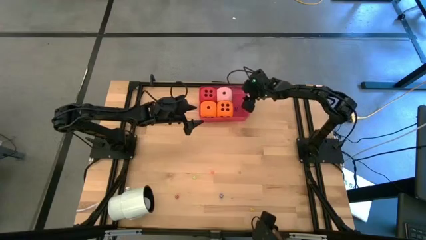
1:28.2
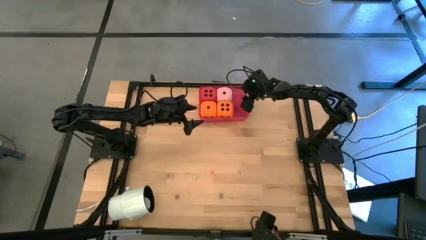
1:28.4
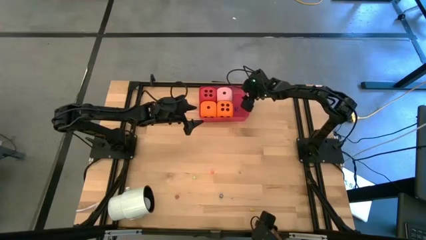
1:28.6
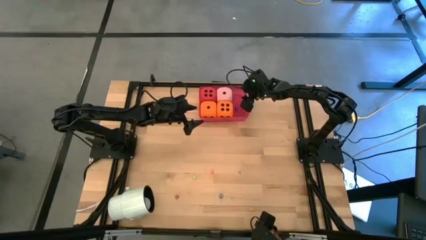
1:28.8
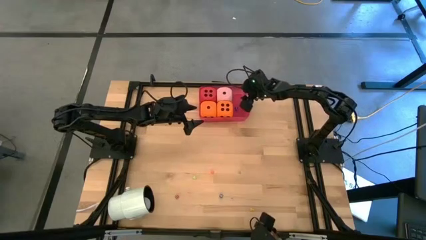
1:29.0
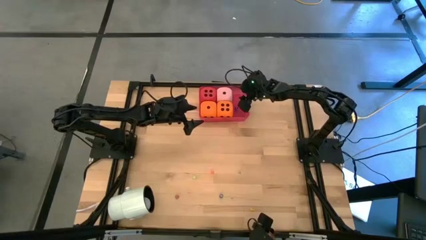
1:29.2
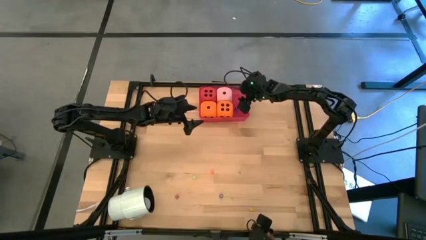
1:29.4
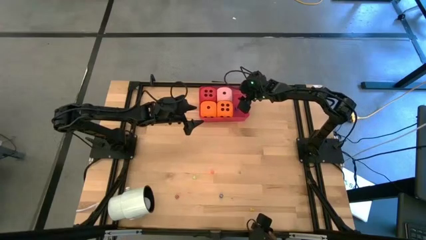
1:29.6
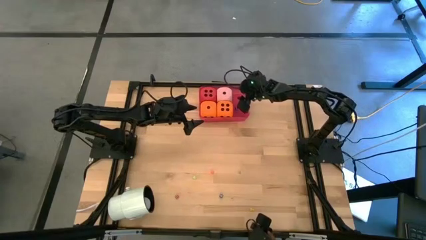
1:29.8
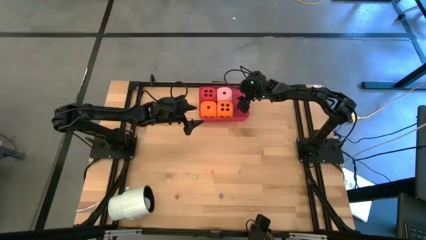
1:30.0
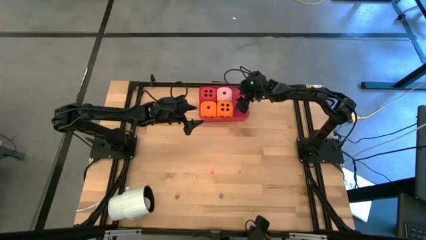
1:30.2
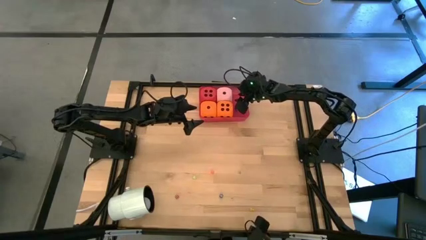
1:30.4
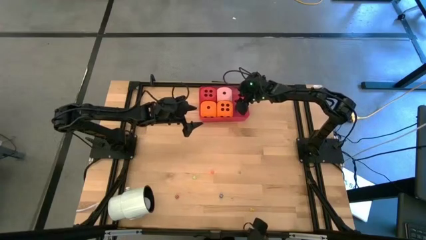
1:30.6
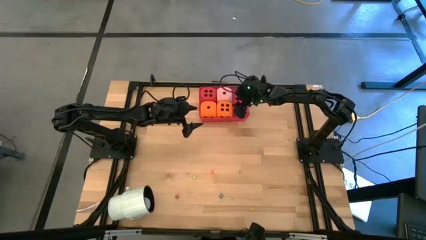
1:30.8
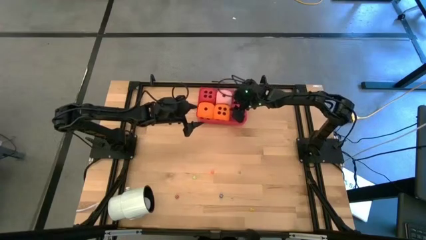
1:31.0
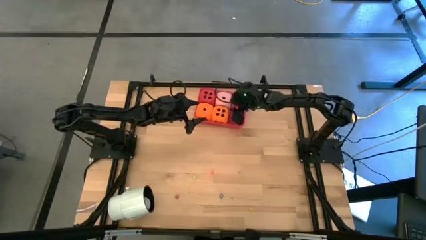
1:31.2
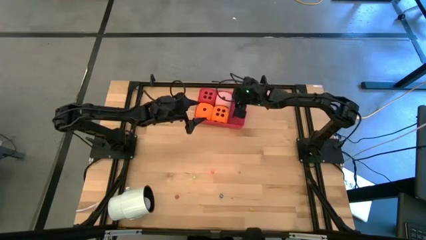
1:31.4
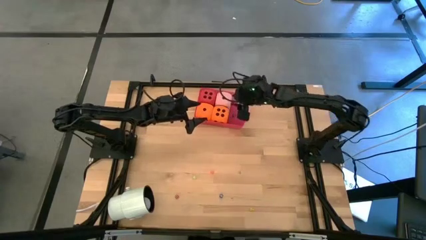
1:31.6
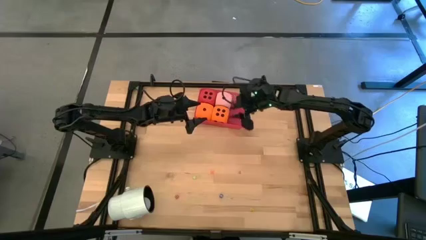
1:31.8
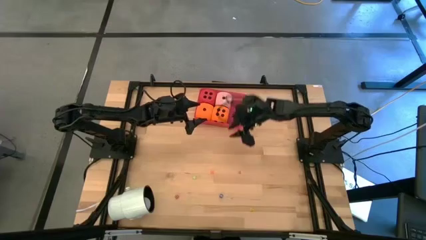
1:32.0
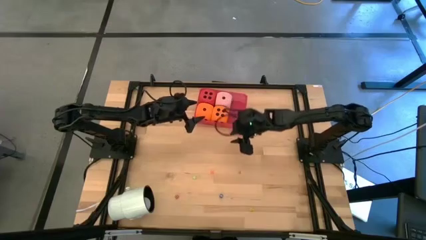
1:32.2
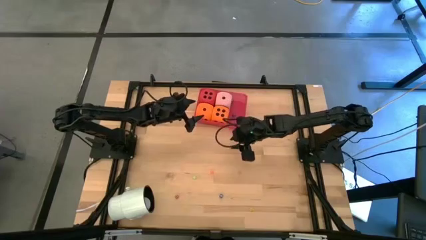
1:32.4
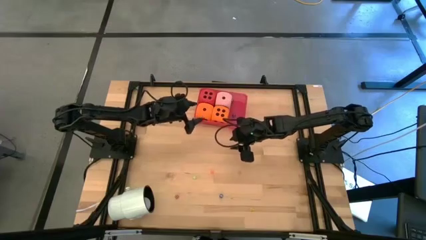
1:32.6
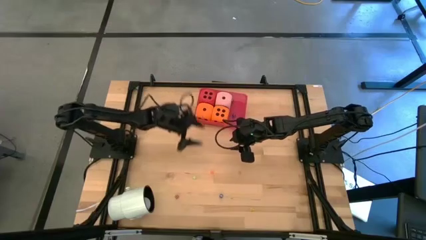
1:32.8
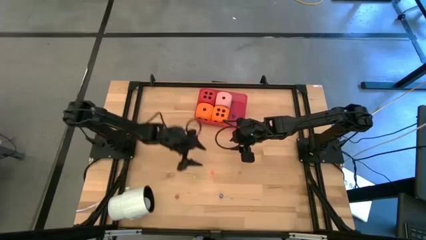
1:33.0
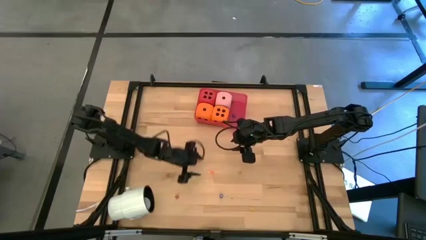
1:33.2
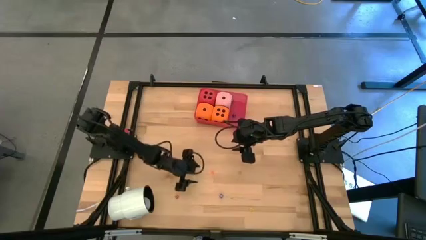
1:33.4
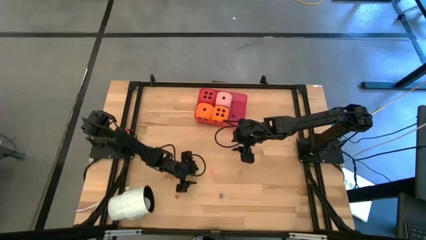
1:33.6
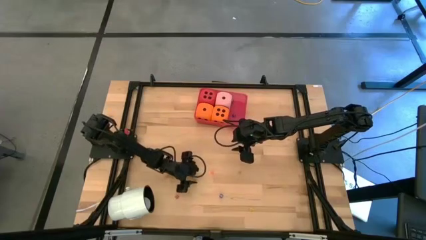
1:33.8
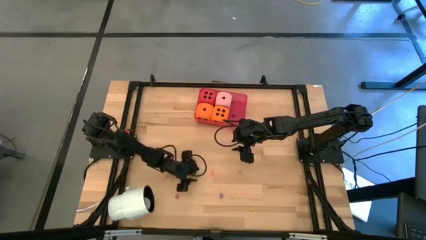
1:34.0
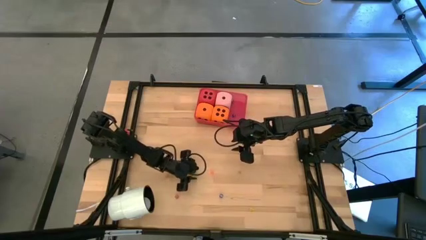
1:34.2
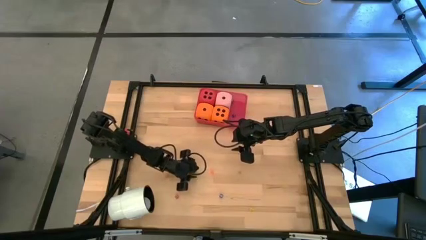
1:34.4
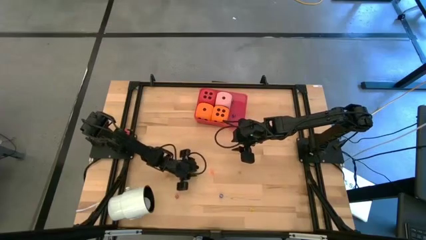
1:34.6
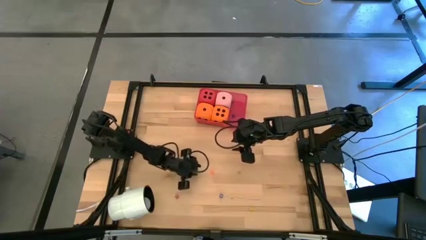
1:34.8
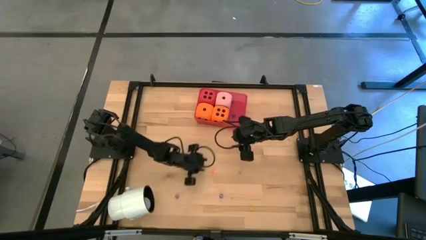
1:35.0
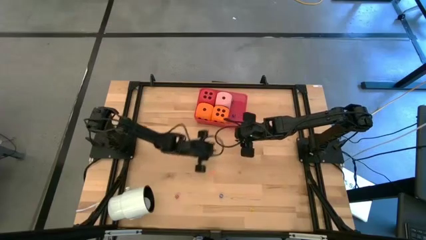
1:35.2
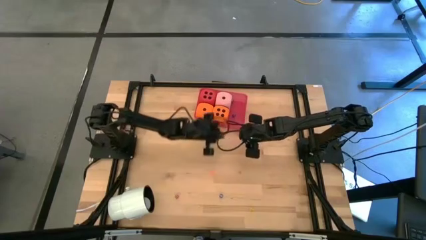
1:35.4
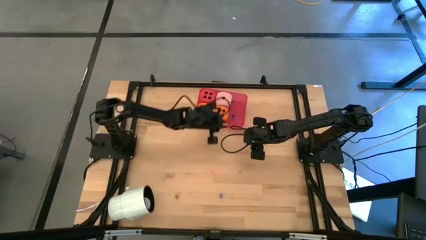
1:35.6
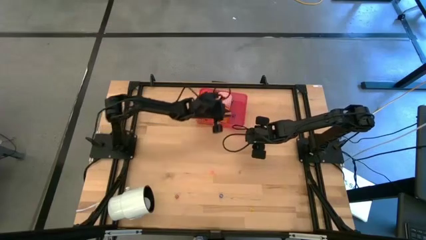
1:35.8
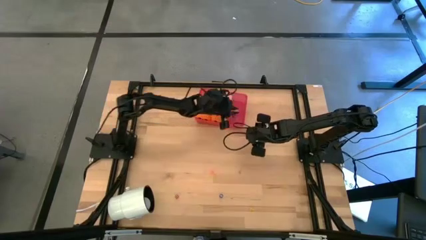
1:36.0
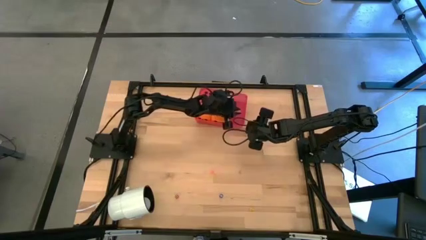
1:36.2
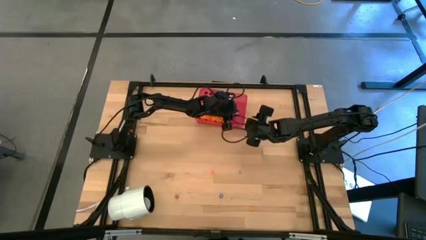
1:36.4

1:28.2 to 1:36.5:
Task: Pick & Place Dice
Put the small green dice into the red container

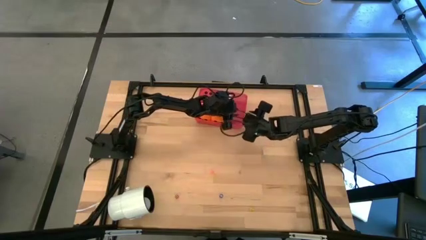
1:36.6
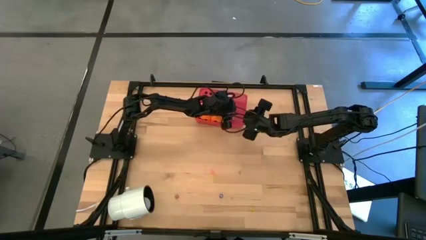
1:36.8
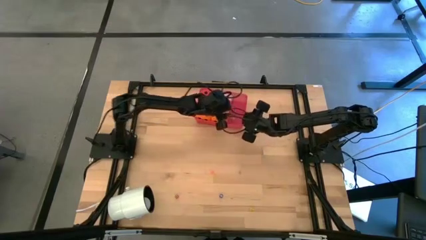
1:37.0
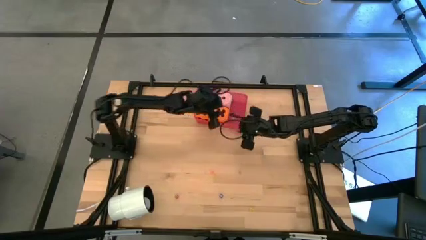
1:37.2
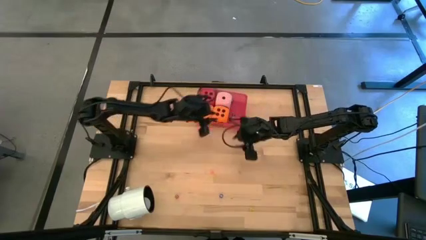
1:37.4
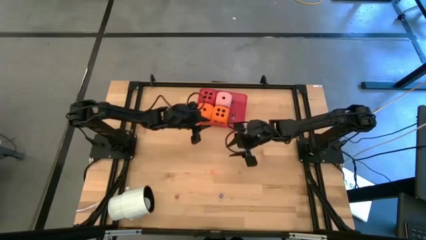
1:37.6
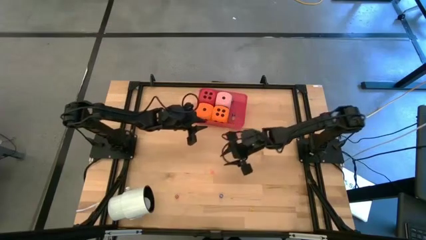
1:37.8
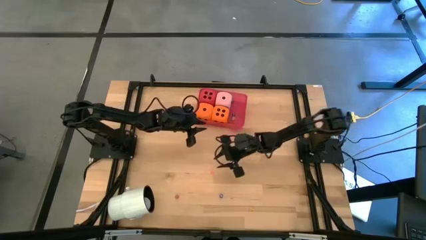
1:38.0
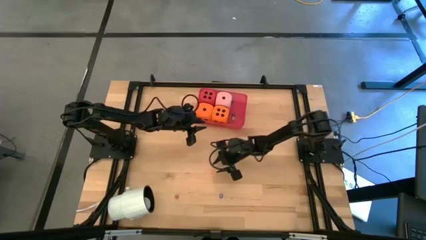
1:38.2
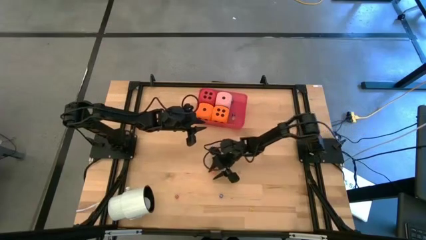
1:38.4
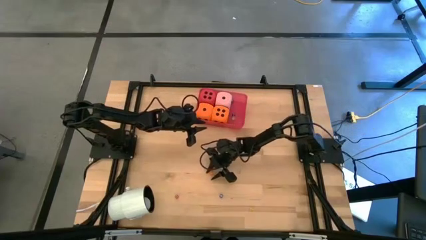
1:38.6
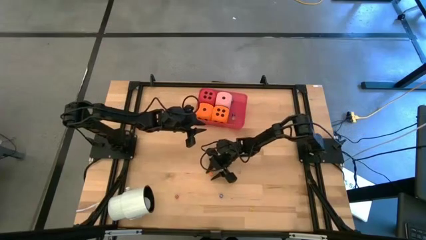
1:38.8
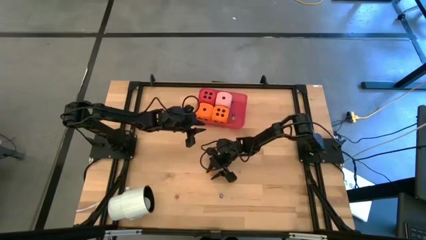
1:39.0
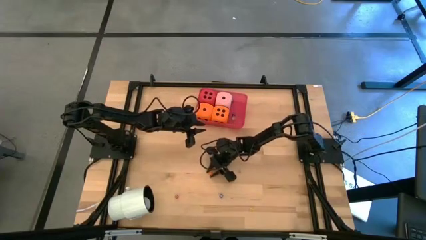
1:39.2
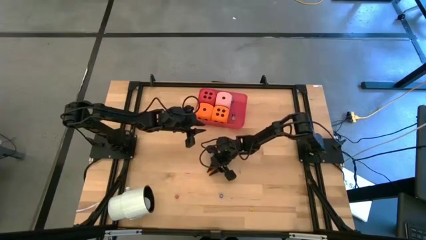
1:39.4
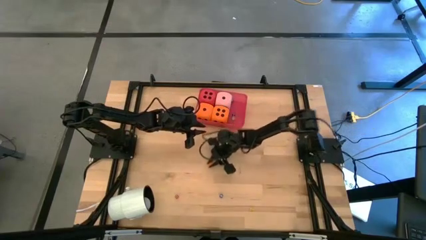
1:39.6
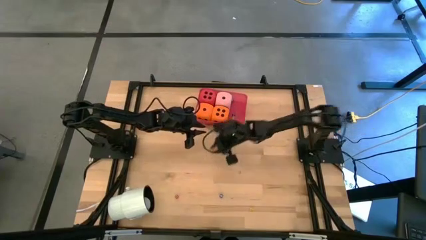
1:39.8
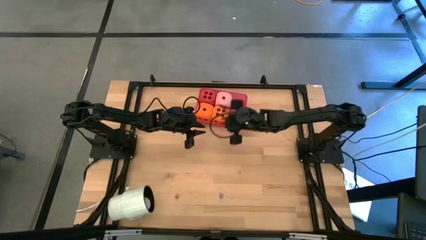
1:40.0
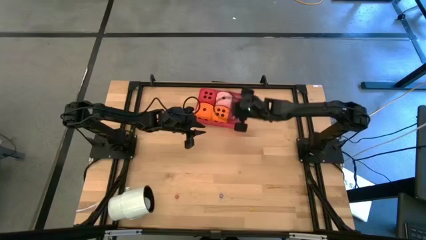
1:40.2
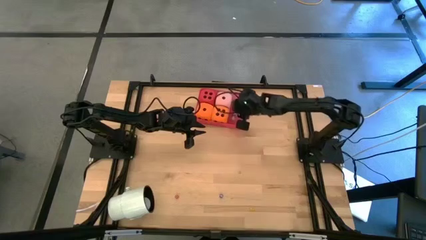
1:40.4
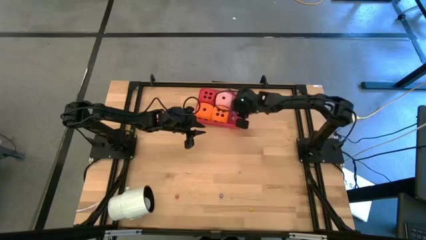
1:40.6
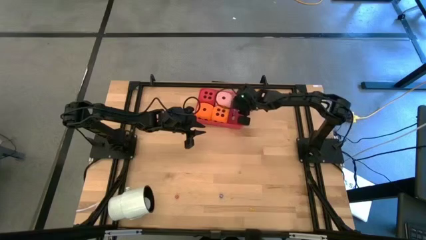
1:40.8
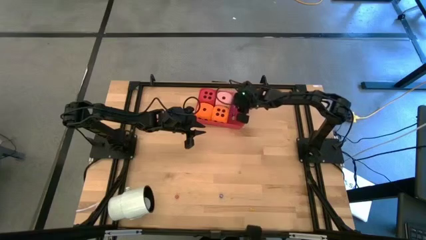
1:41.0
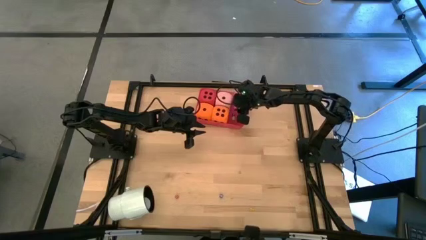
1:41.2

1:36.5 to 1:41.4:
Put the small orange dice into the red container

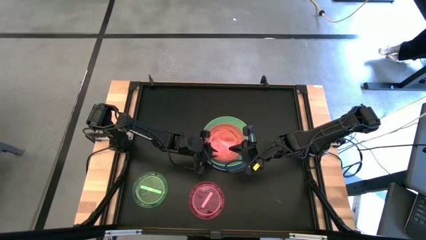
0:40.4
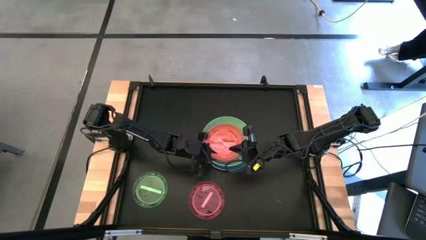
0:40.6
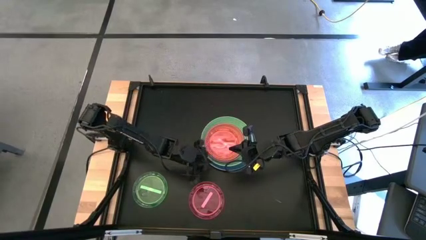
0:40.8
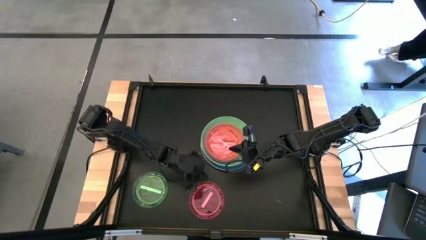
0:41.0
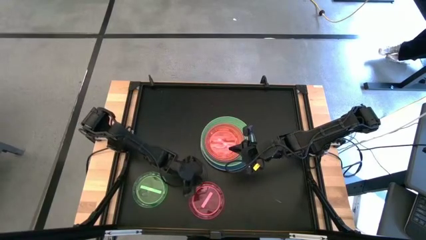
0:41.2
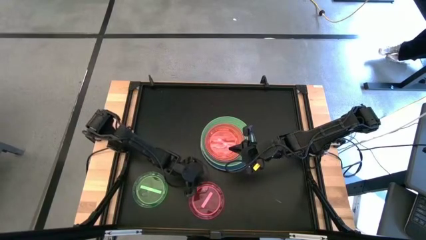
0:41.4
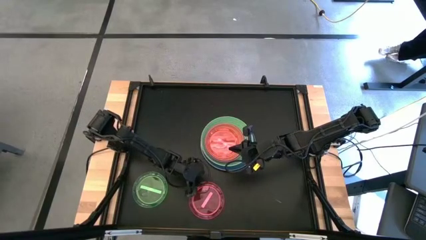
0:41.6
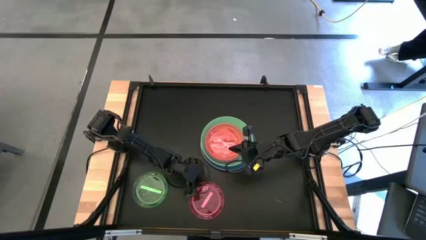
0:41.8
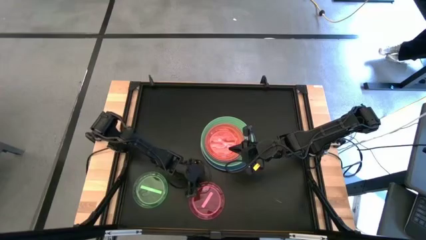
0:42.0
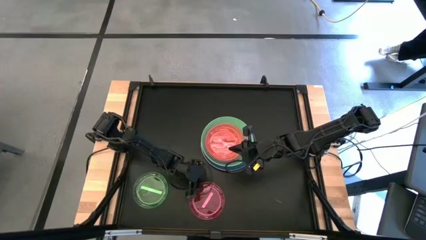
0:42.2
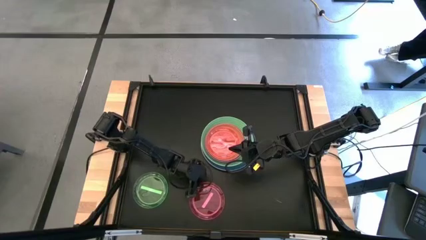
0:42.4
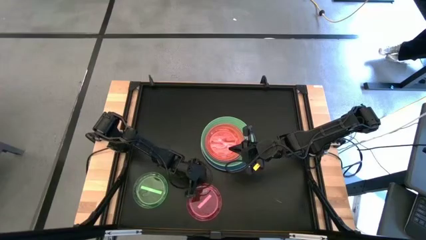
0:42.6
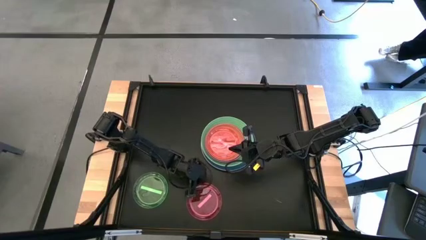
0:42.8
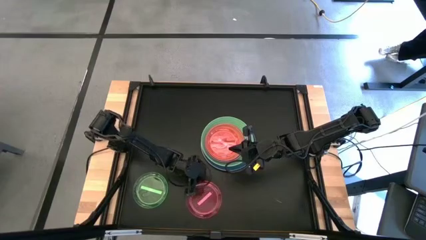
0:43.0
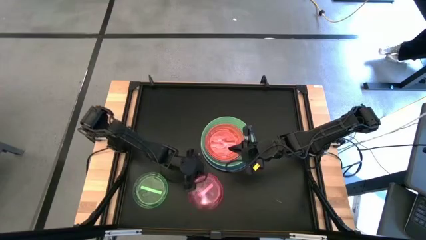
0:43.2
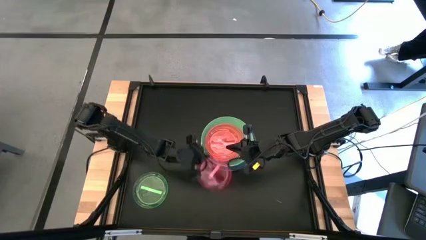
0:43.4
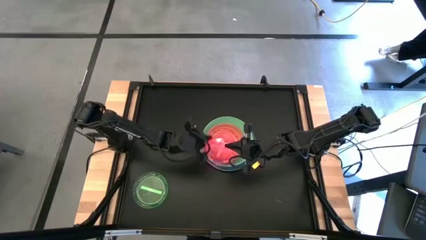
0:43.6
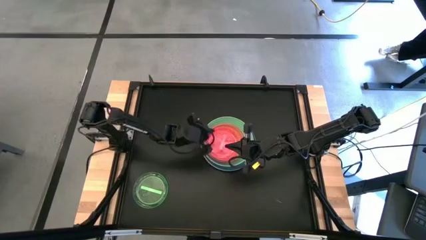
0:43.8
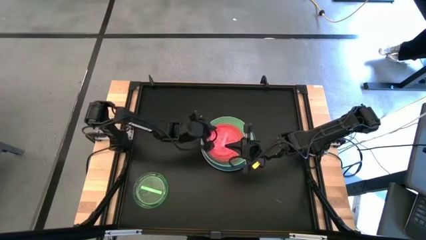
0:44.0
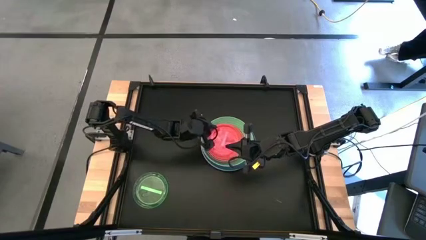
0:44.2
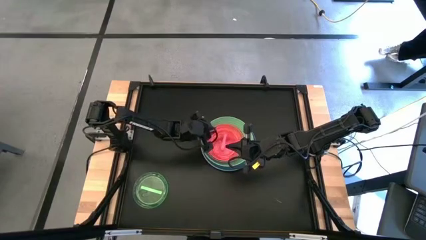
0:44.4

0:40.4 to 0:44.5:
Task: Stack plastic plates
Stack the pink plate on top of the pink plate
